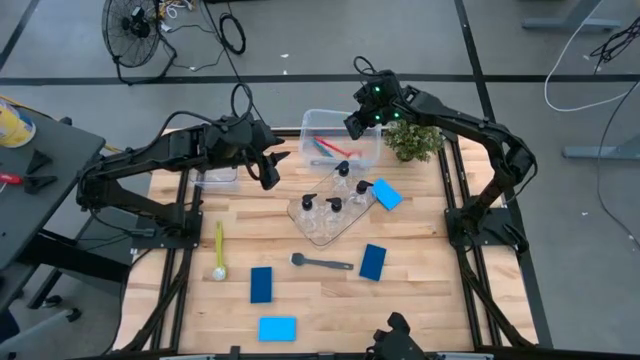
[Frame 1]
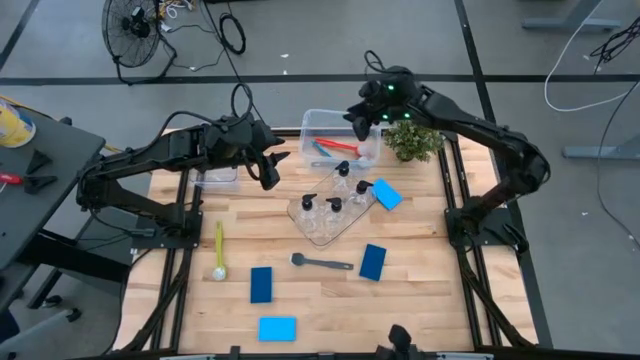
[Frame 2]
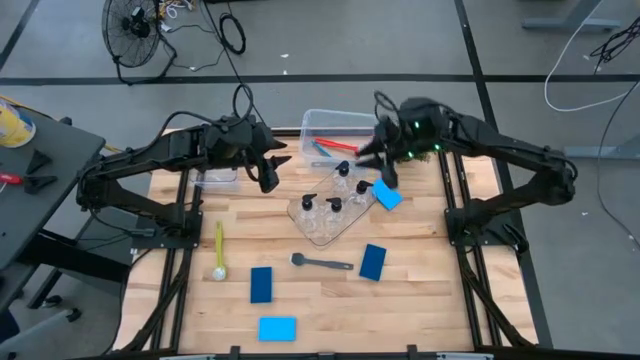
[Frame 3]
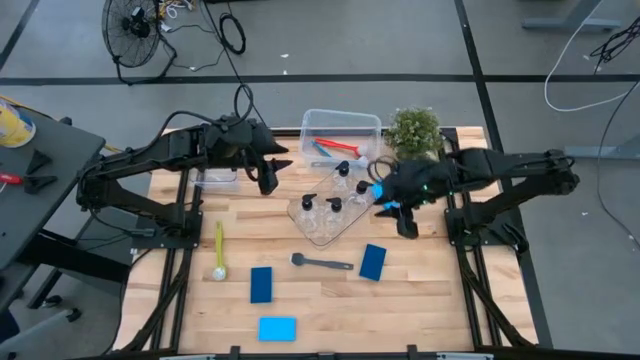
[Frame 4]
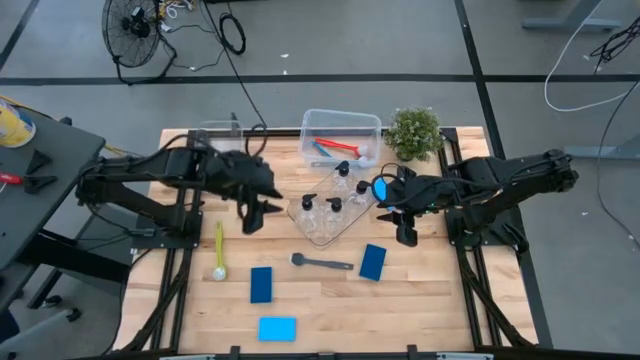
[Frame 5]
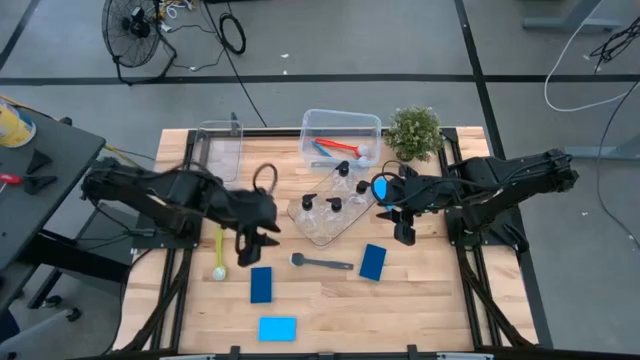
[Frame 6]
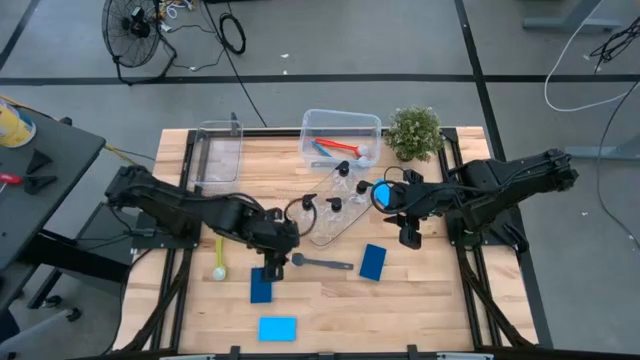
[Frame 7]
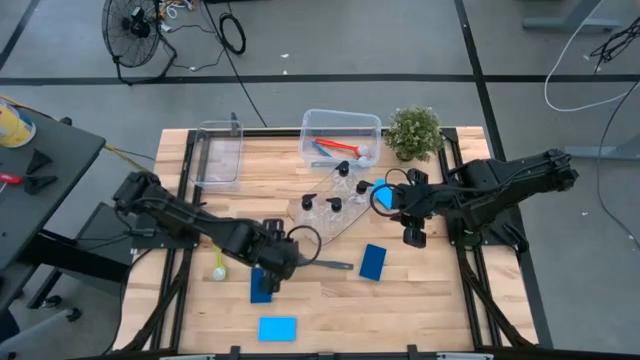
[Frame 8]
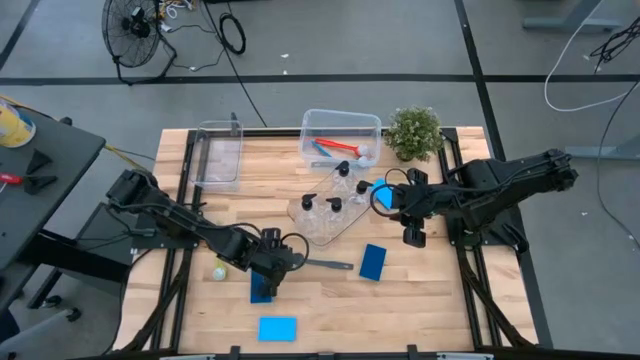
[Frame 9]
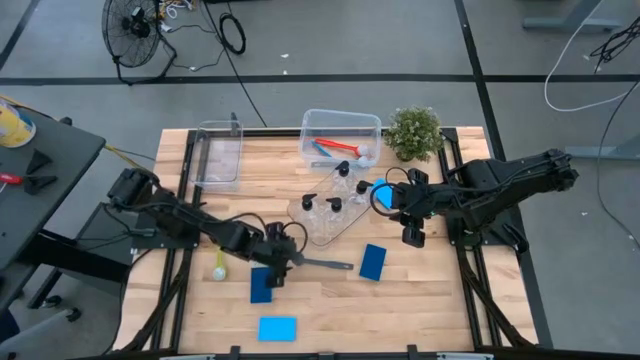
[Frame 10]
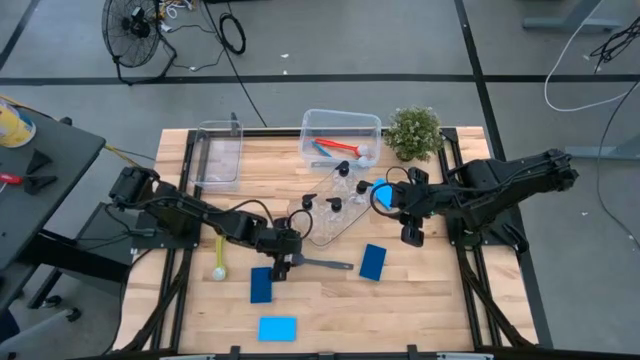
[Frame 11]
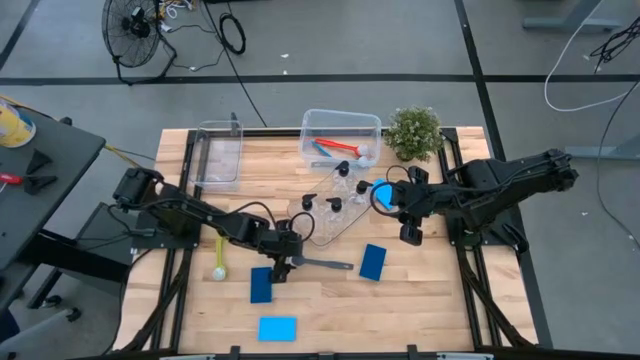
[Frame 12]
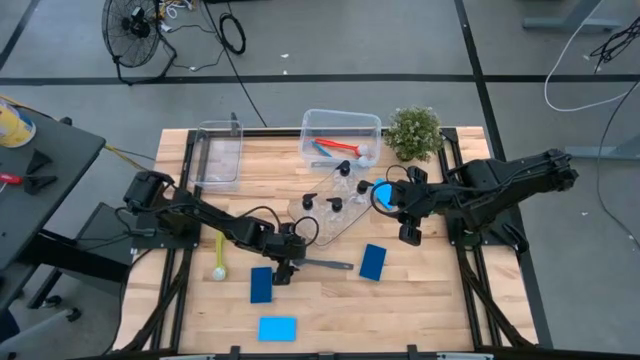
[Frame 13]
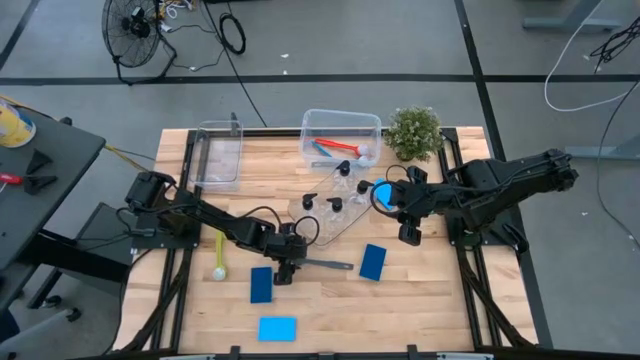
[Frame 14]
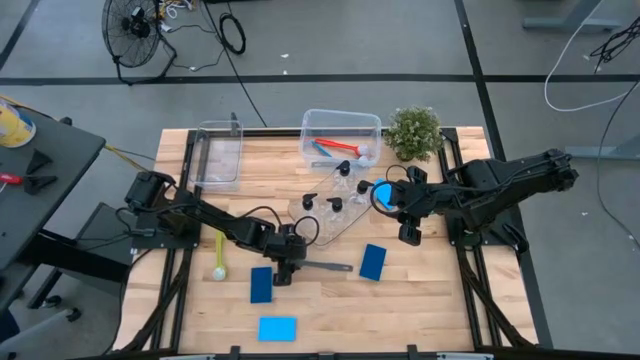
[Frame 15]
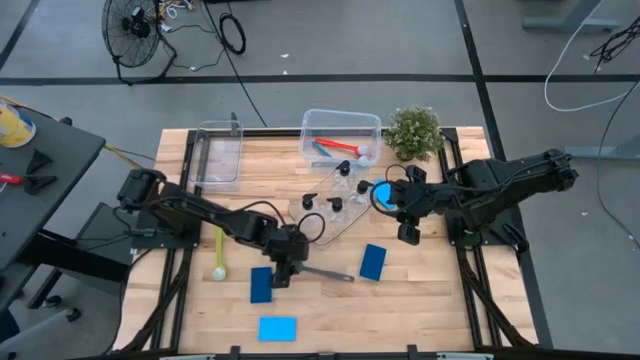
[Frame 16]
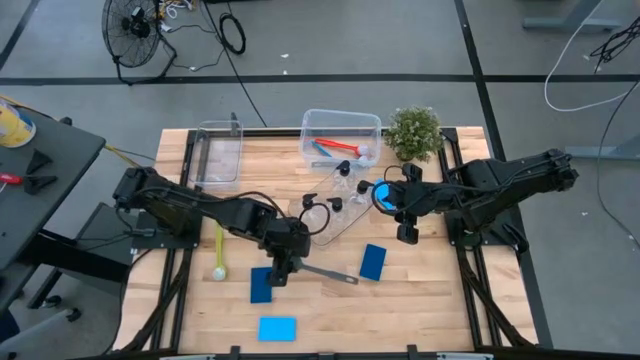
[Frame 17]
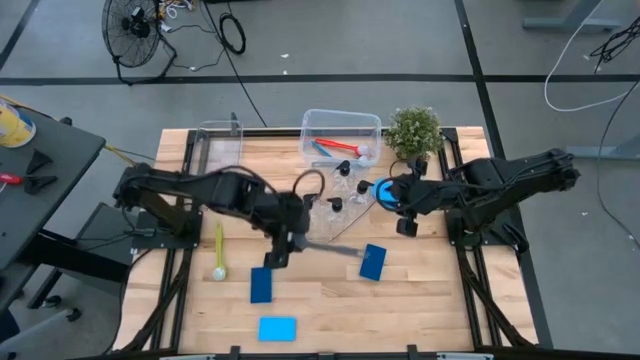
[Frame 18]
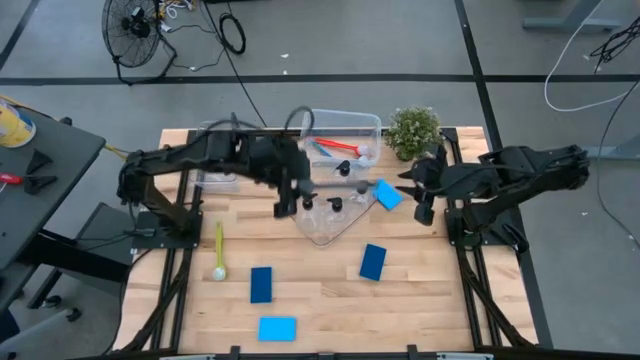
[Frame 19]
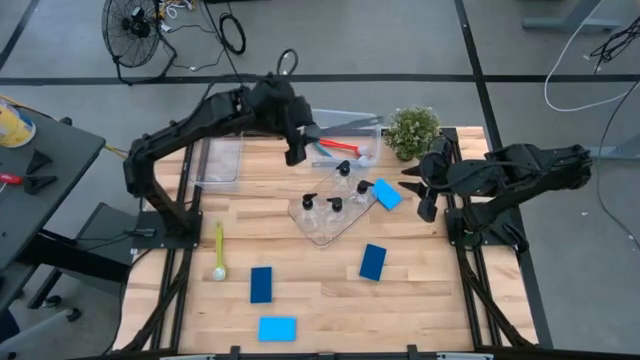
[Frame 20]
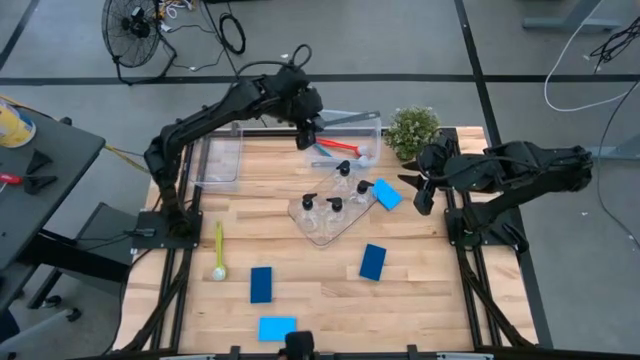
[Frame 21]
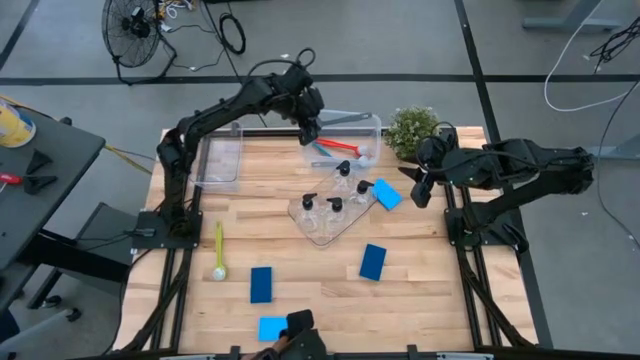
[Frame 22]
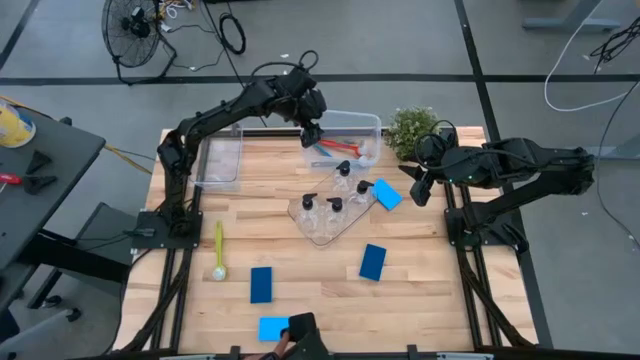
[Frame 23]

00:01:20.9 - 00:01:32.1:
Task: Pick & Place Kitchen Sink Supplies
Put the gray dishwashing brush into the transparent container

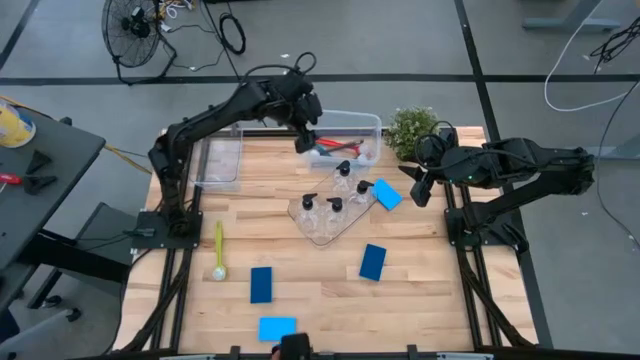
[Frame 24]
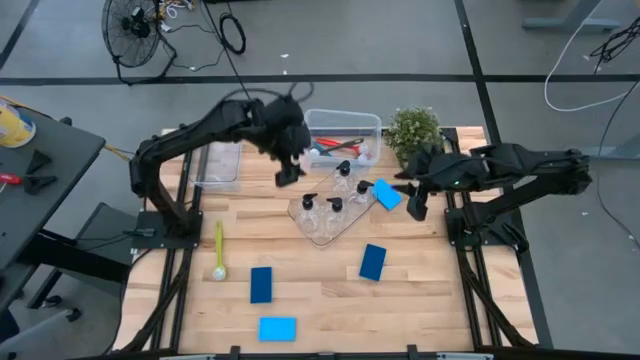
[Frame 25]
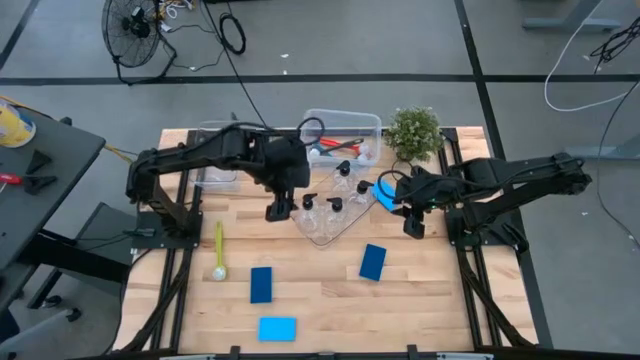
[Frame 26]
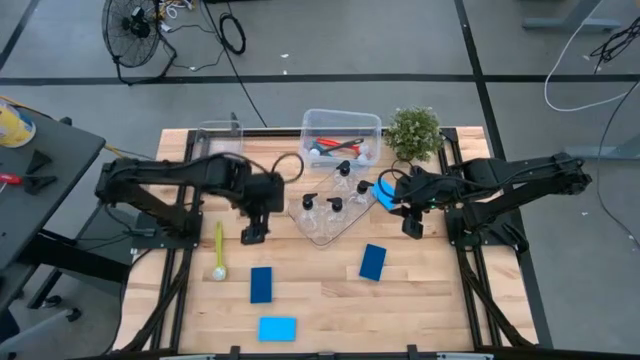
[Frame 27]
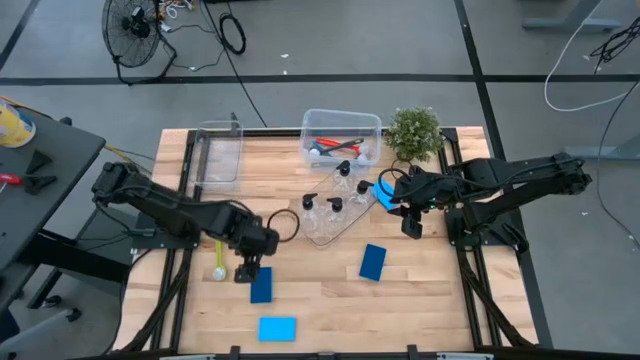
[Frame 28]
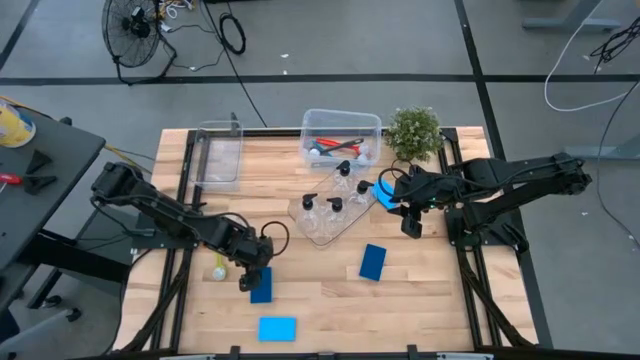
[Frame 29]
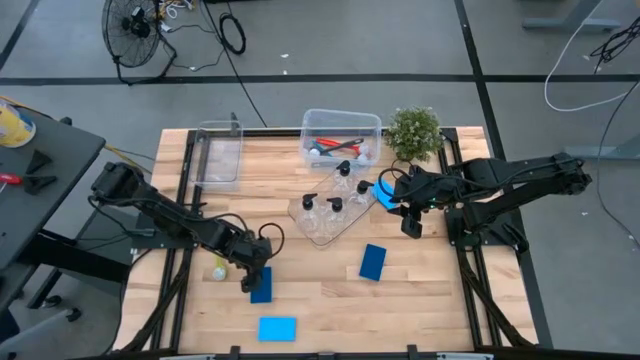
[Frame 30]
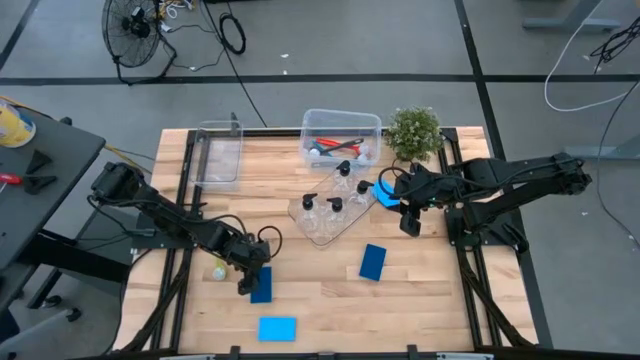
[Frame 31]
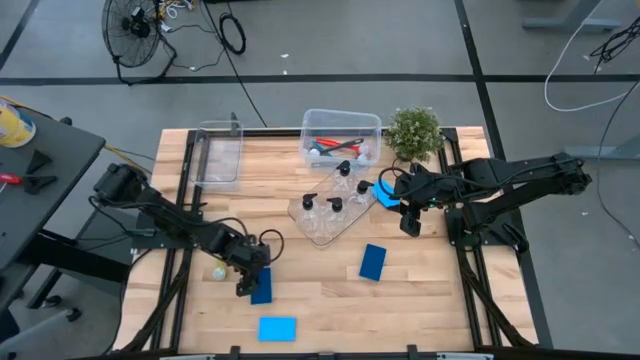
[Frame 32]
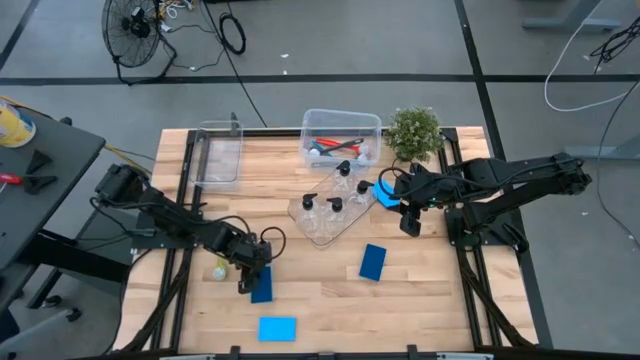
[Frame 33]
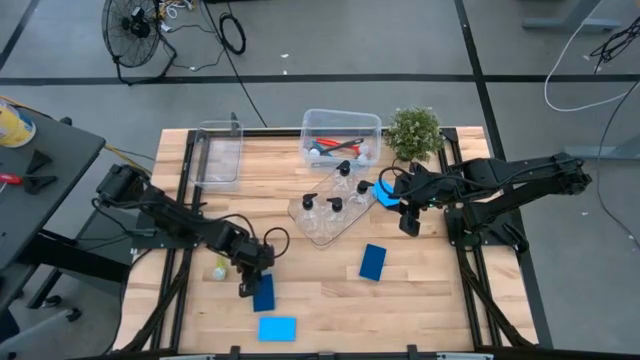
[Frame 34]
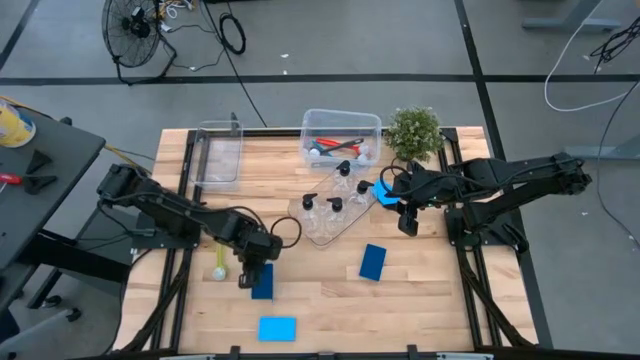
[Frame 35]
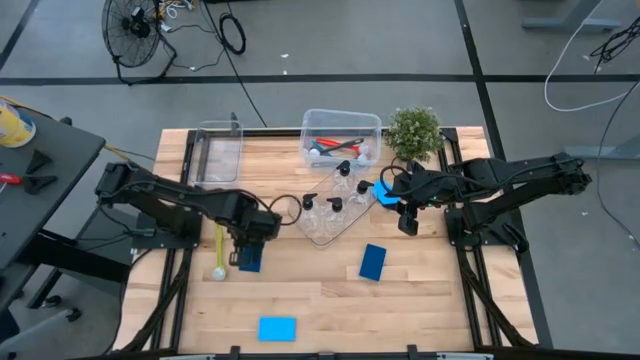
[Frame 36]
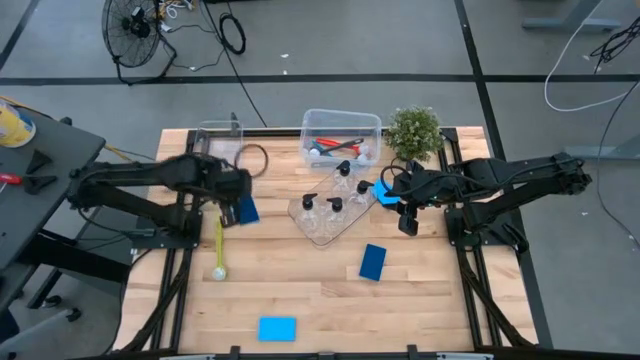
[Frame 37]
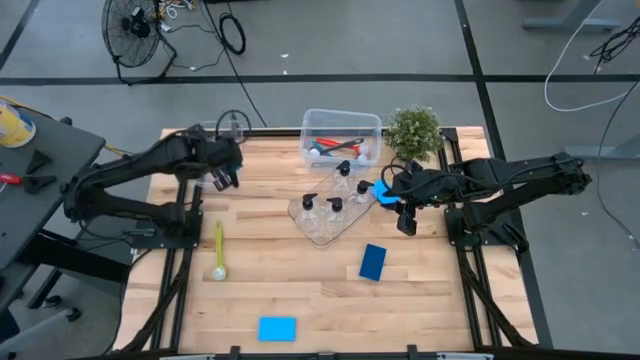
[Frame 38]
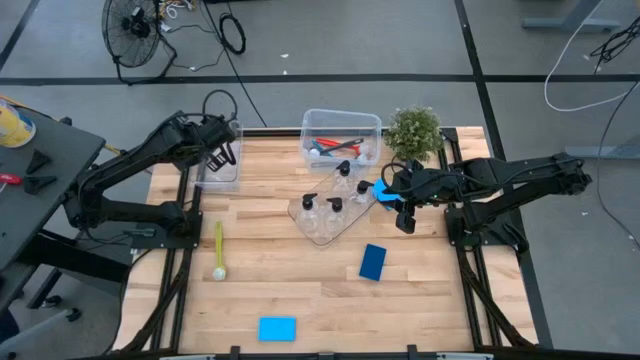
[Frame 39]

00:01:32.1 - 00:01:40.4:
Put the blue sponge wipe into the left transparent bin

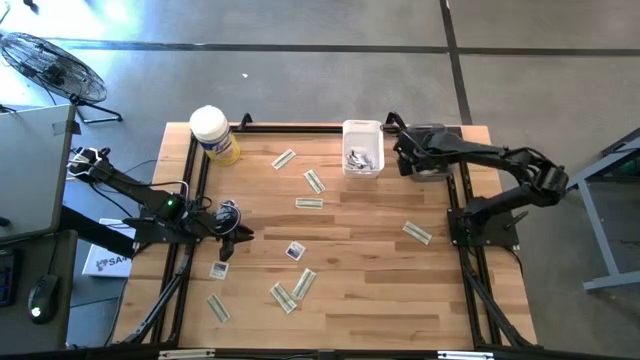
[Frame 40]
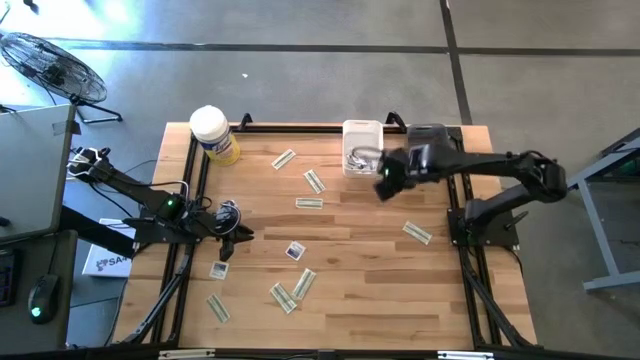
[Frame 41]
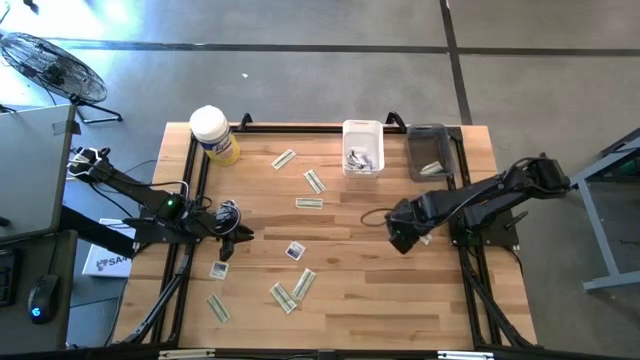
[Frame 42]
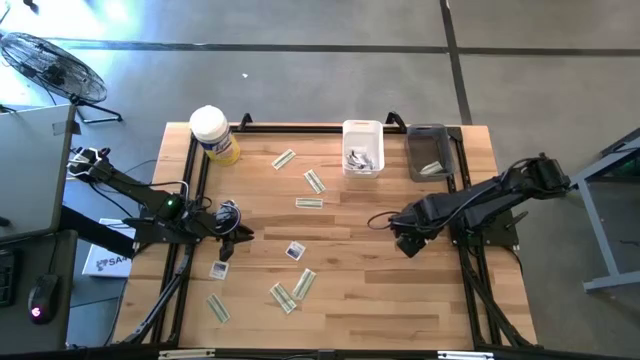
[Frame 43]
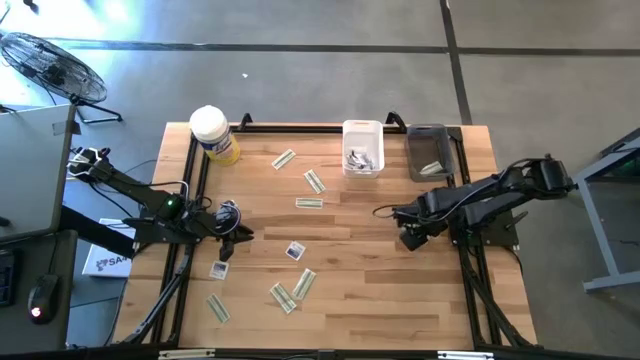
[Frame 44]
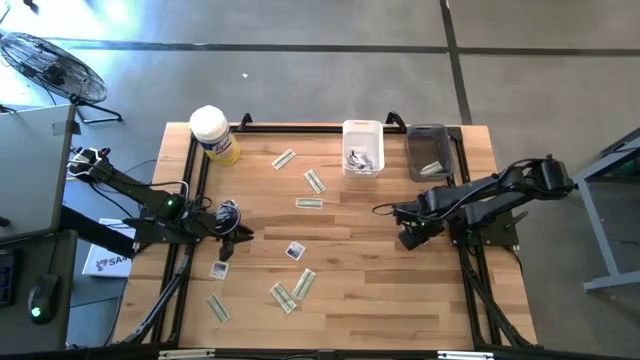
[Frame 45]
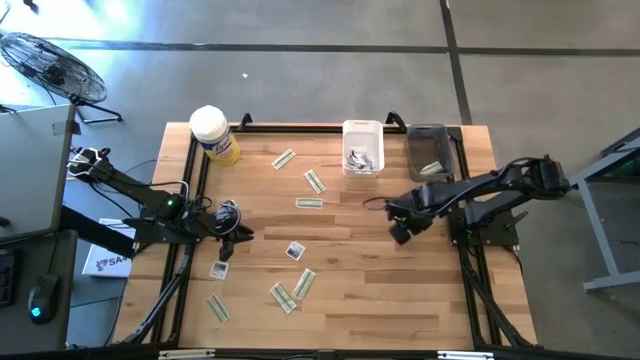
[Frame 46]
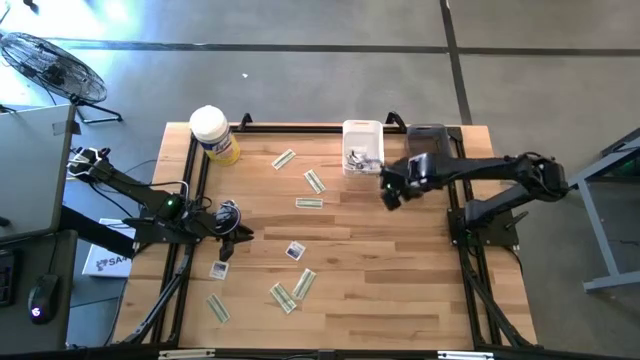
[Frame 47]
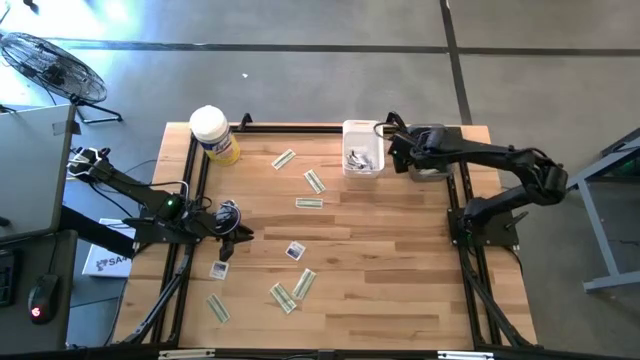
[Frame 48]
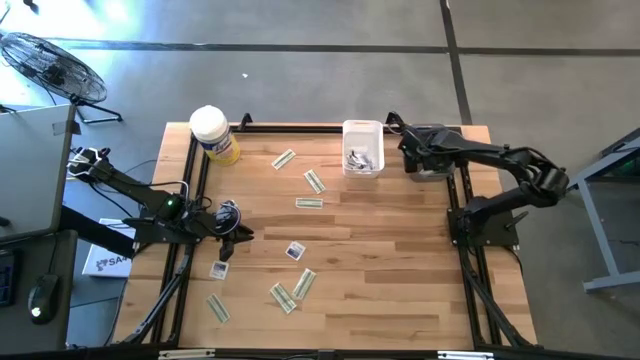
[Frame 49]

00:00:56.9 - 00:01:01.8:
Task: Pick & Place First Aid Supplies
Put the green bandage into the black bin
